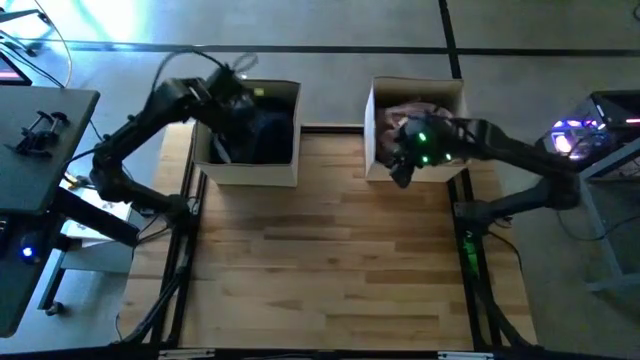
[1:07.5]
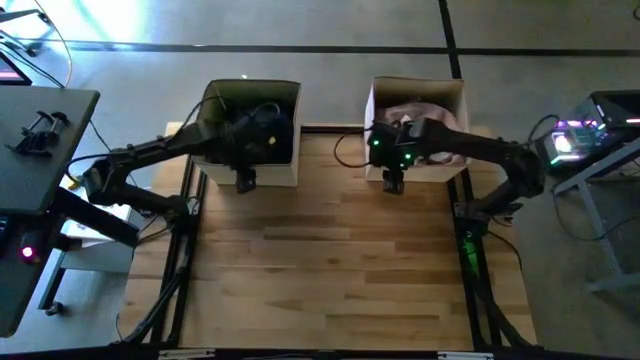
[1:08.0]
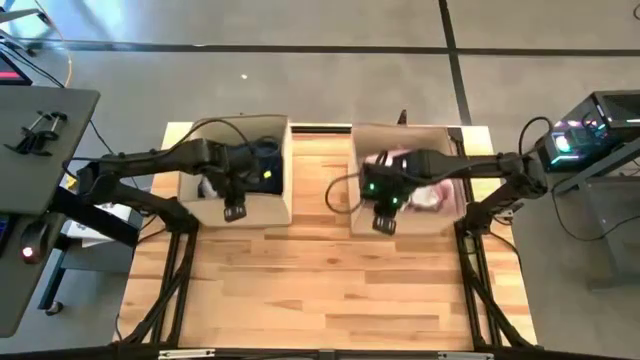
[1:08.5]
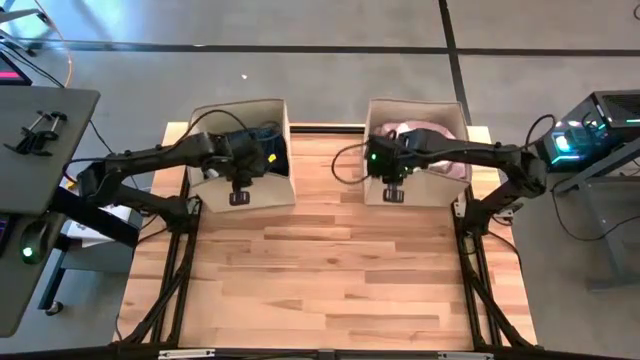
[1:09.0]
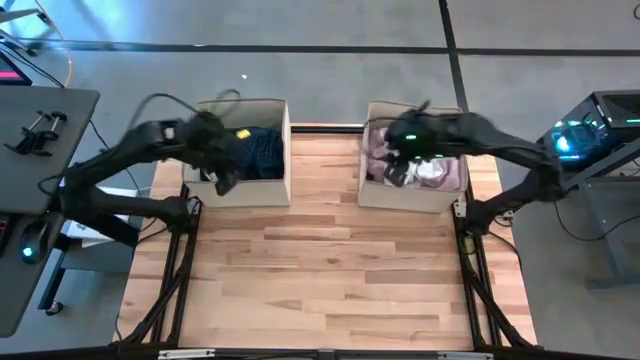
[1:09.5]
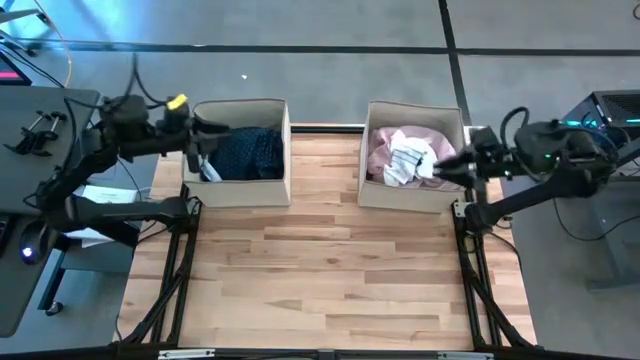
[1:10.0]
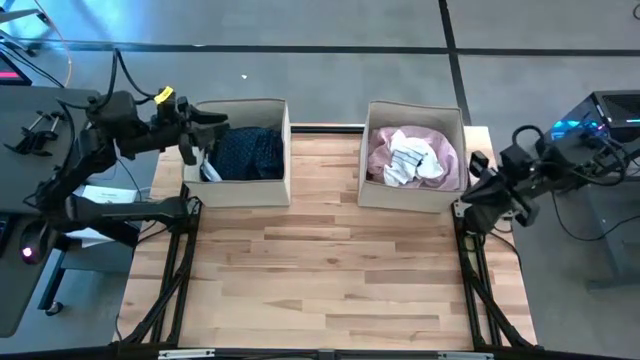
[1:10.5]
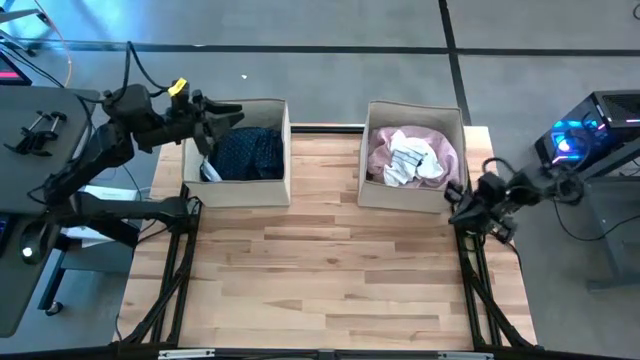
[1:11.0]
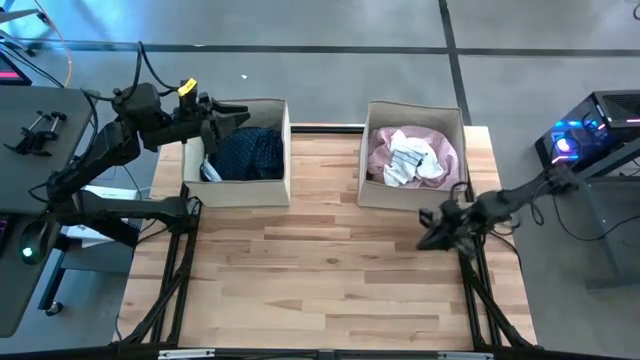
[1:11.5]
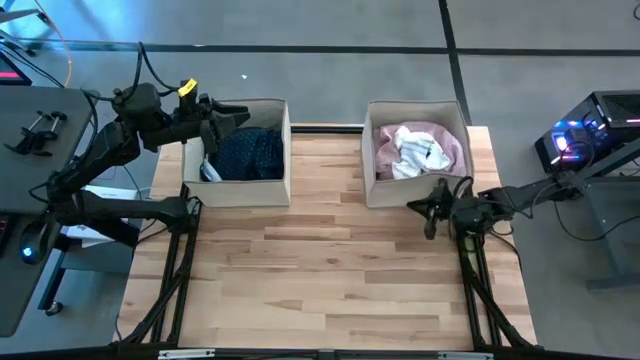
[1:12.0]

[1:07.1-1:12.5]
Task: Sort clothes
Adjust the laundry bins

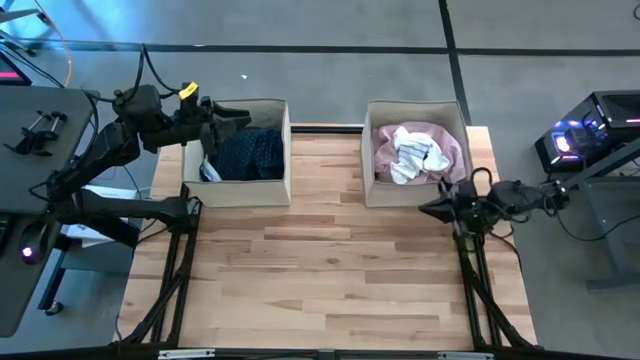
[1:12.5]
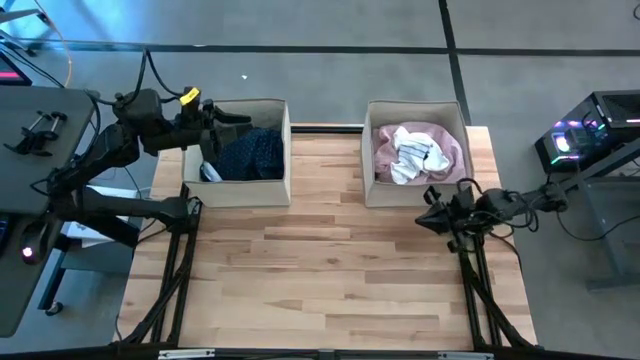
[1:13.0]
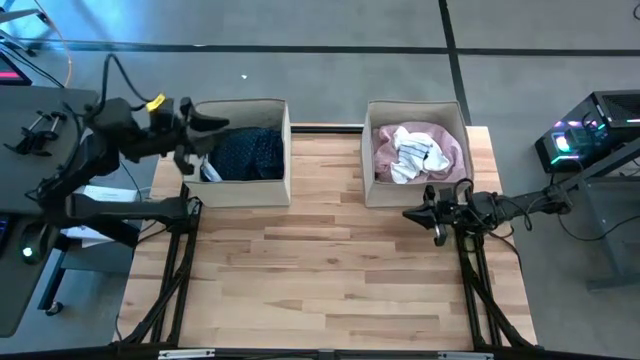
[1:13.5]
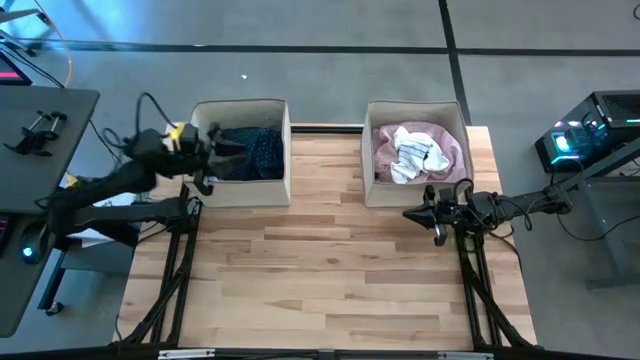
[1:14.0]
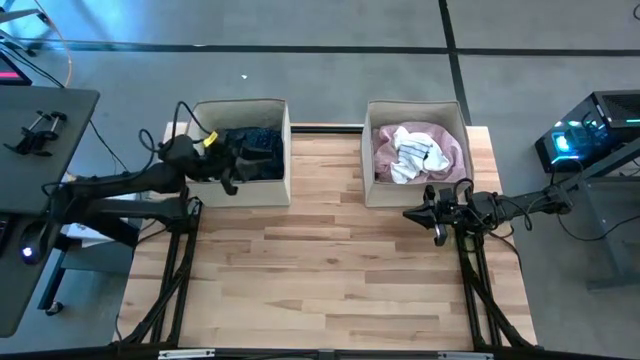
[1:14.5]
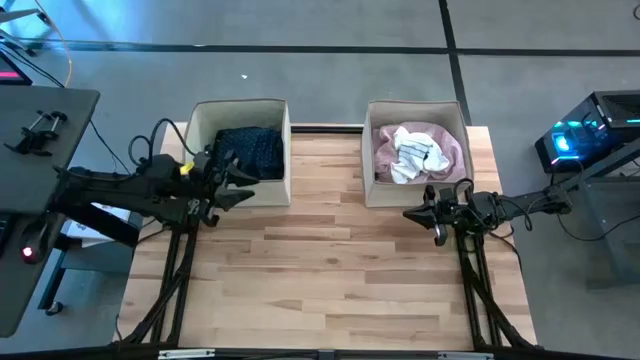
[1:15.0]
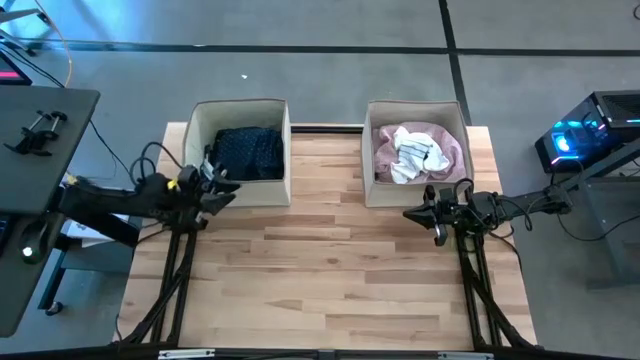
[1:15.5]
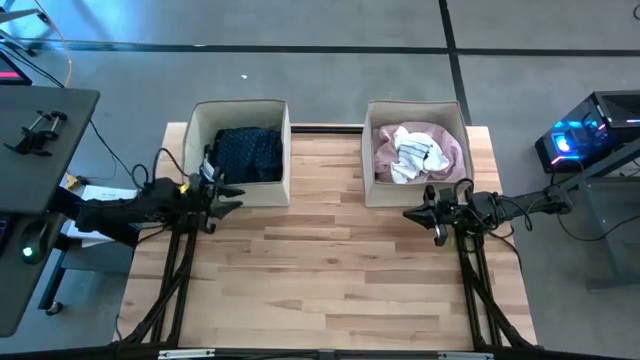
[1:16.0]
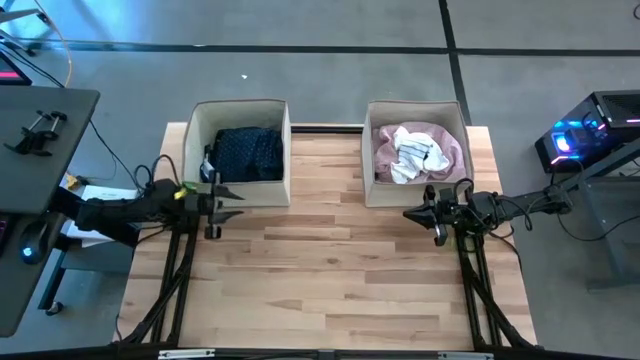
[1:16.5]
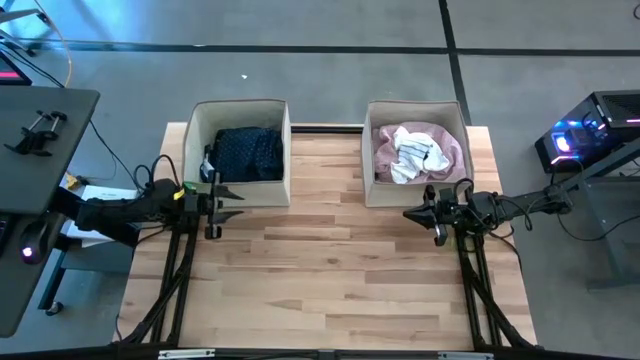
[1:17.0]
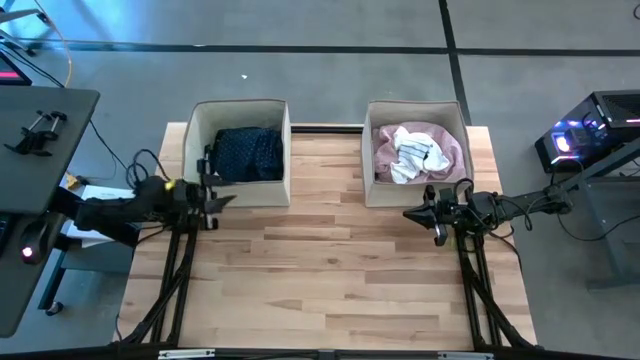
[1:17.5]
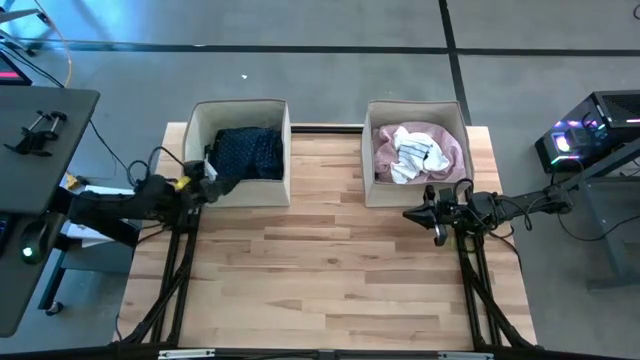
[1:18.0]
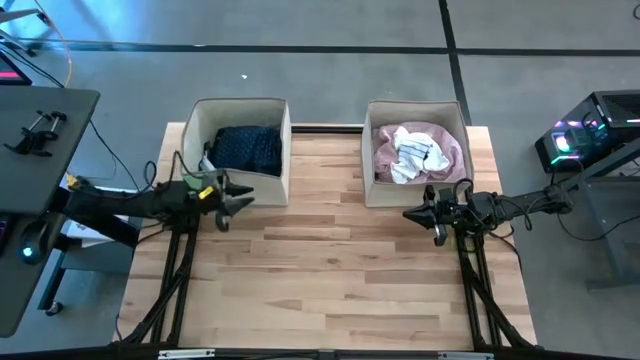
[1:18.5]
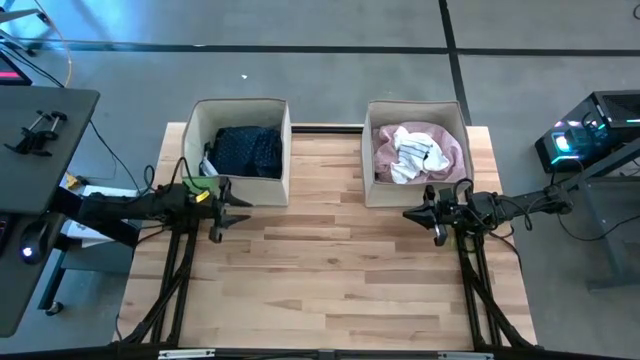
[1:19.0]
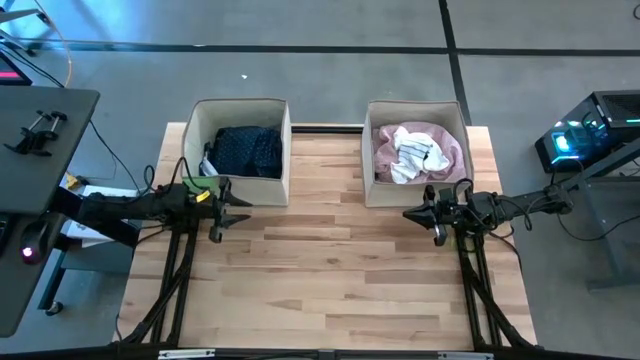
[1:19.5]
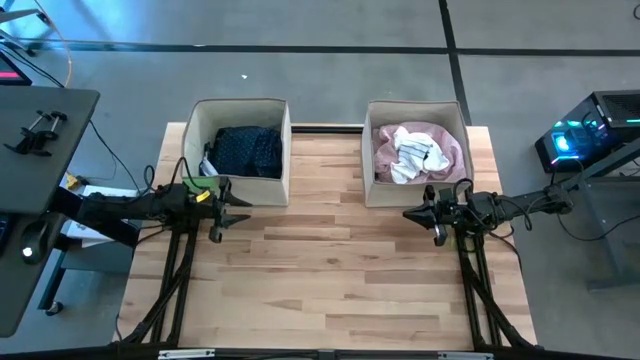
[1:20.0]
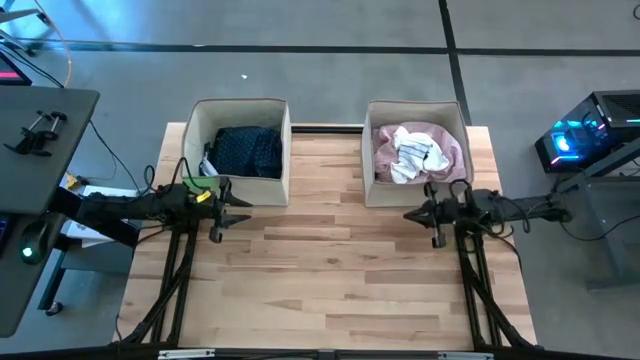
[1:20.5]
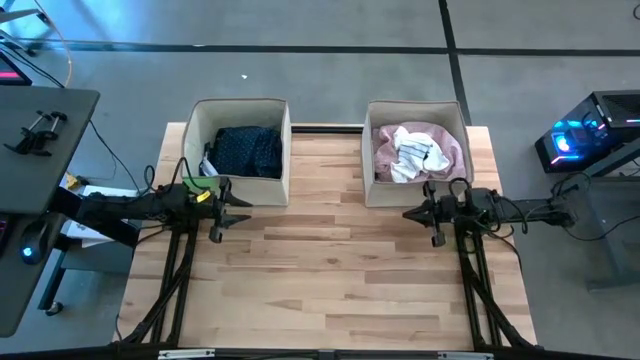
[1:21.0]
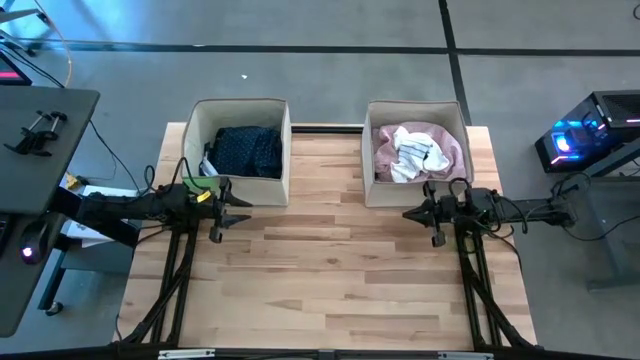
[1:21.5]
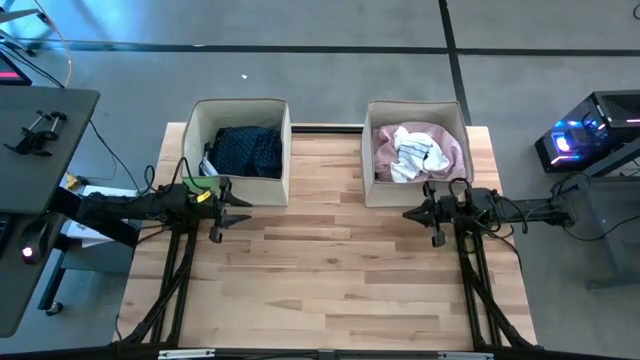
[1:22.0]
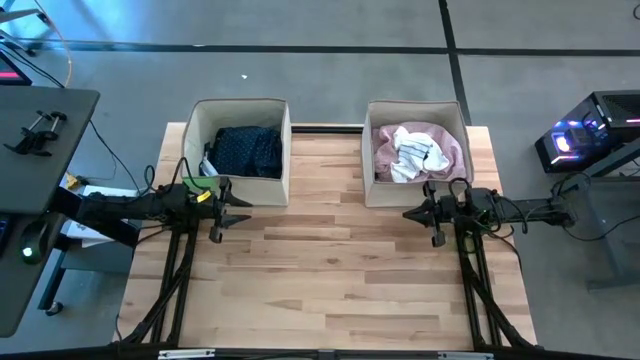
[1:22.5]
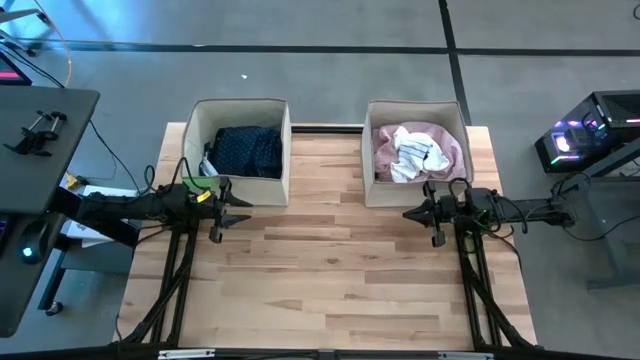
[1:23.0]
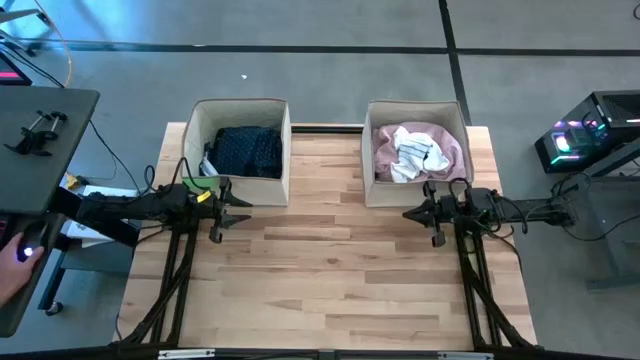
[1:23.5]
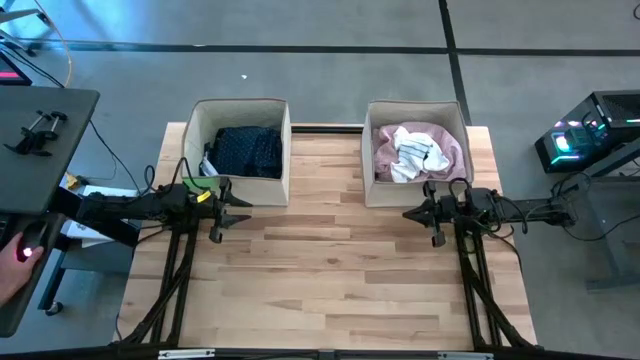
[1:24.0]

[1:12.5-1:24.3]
Return to home position

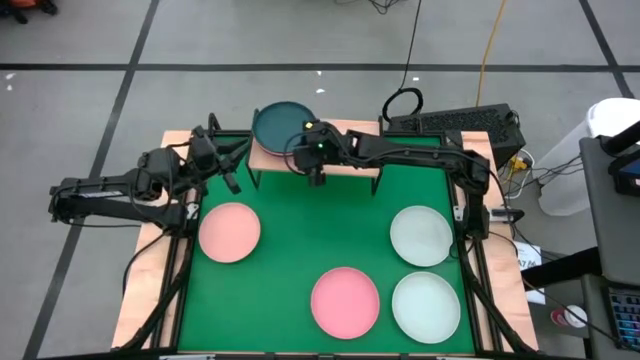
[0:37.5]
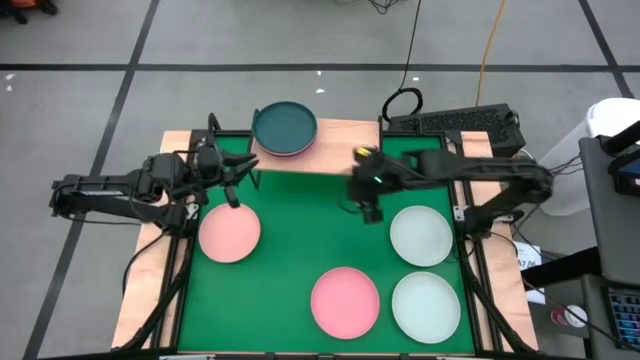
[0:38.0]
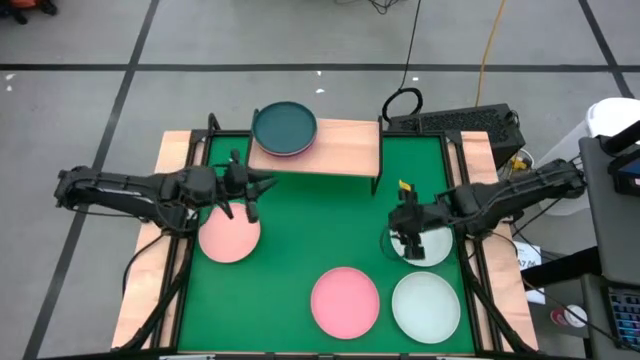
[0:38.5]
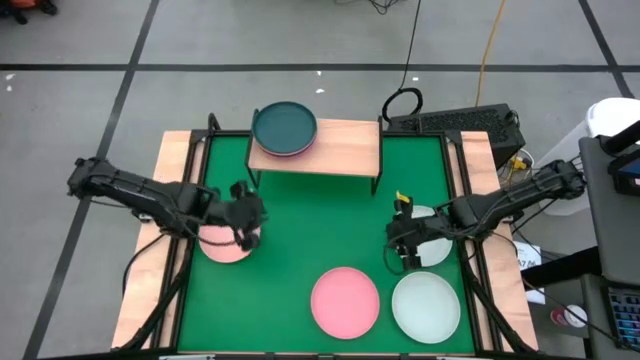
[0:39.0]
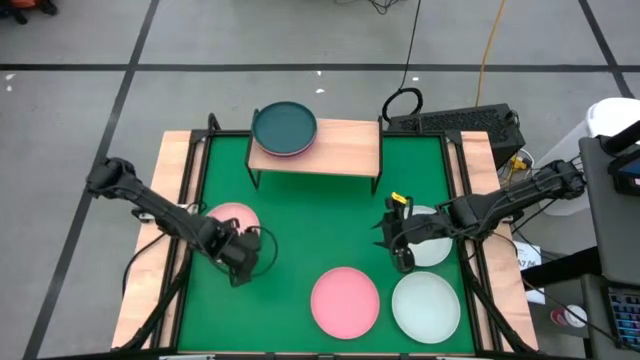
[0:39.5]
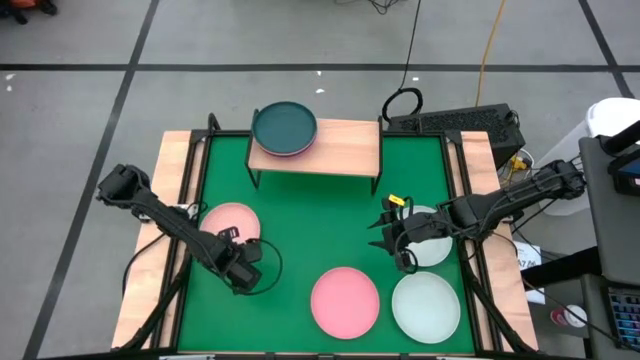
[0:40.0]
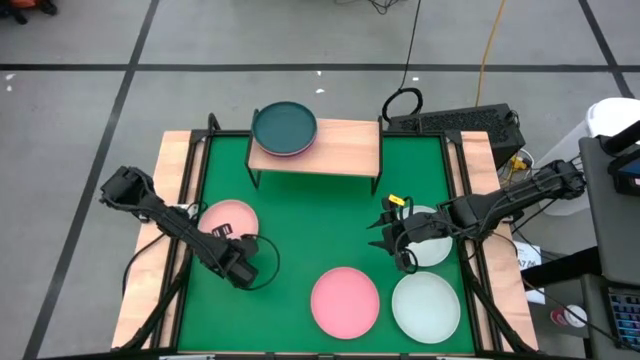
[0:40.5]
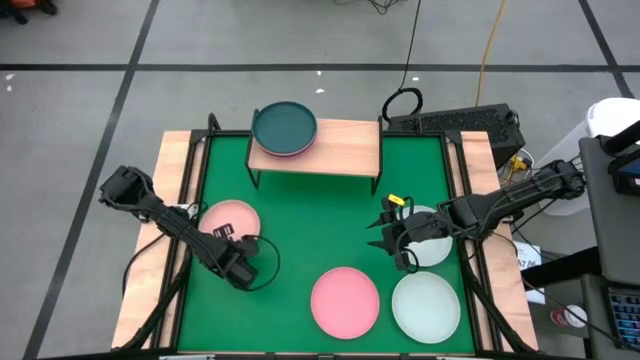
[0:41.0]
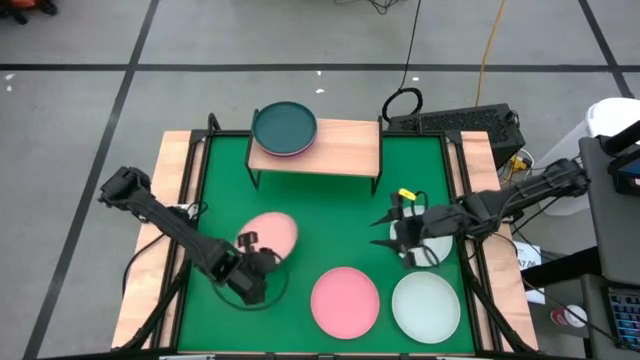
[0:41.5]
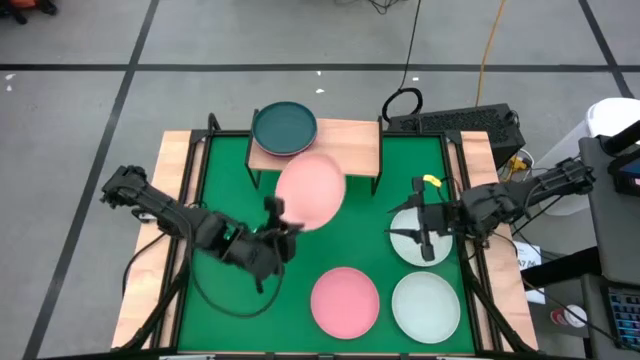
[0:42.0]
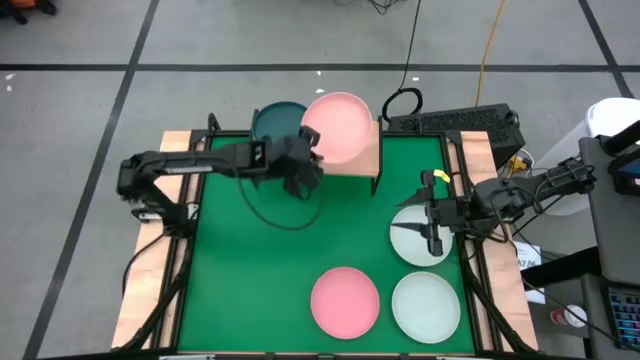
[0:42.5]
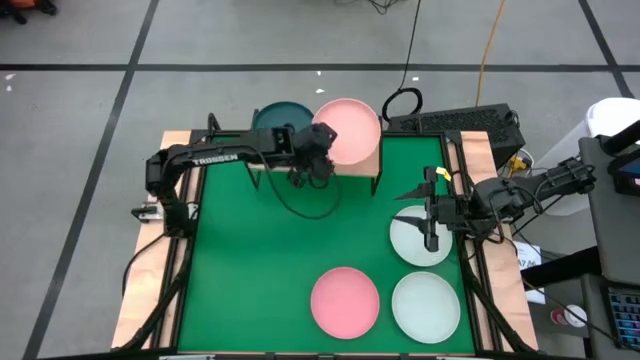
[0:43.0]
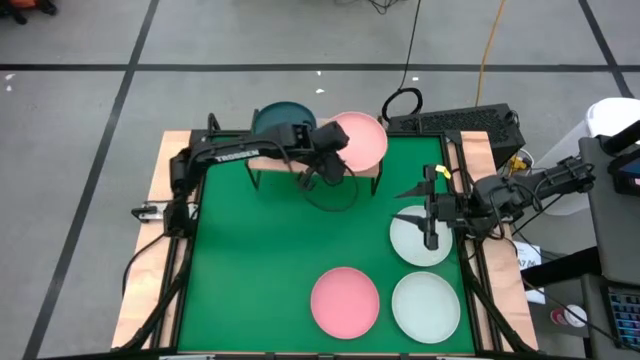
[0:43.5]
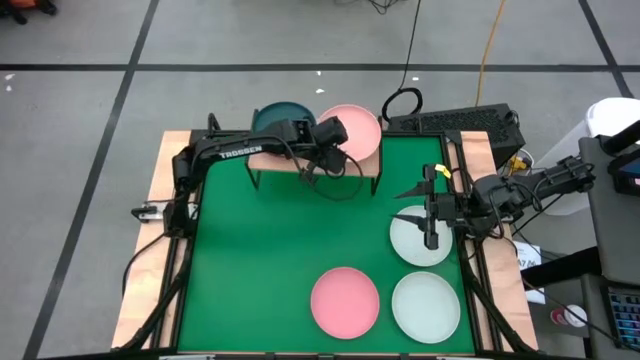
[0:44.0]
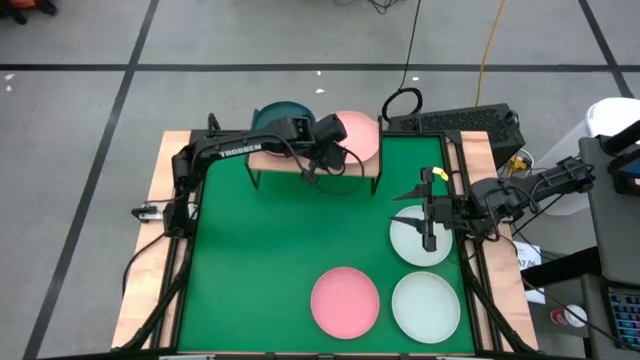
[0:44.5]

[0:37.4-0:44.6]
Task: Place and stack plates onto a shelf
Put the light pink plate on the shelf
